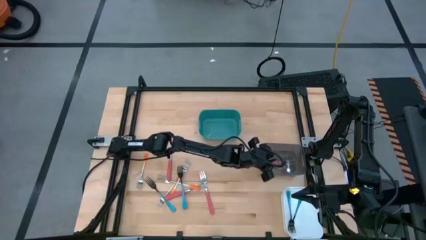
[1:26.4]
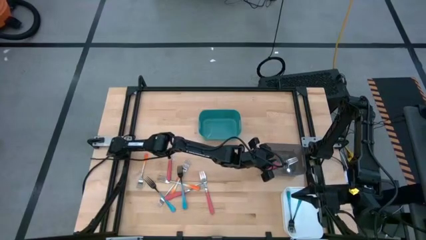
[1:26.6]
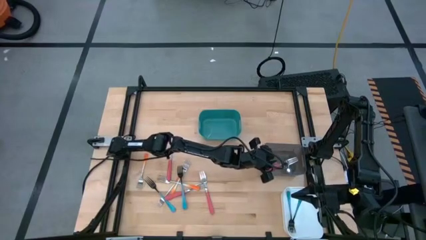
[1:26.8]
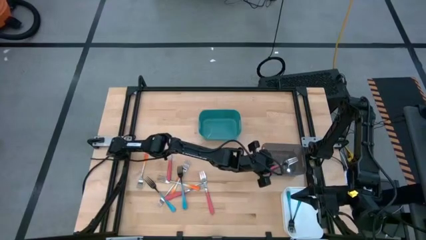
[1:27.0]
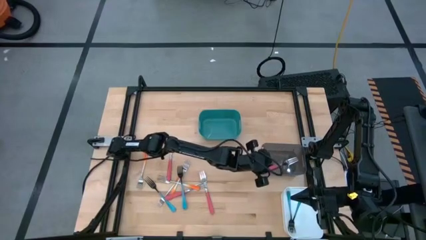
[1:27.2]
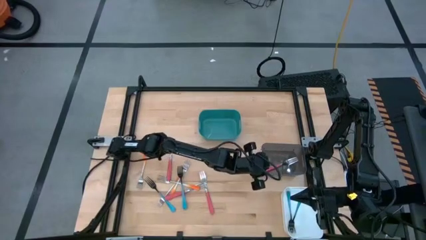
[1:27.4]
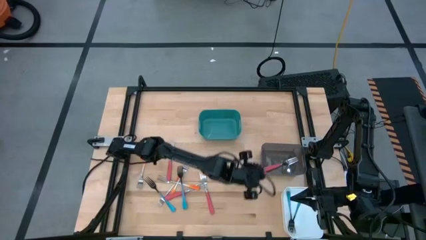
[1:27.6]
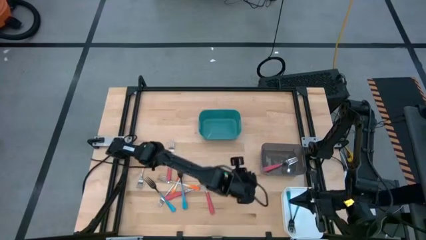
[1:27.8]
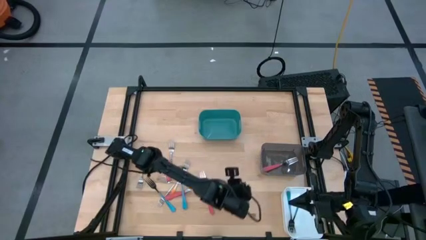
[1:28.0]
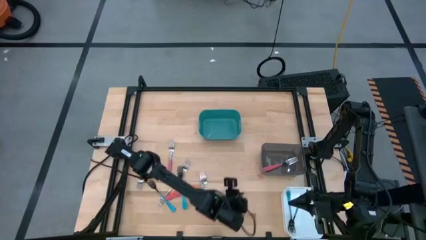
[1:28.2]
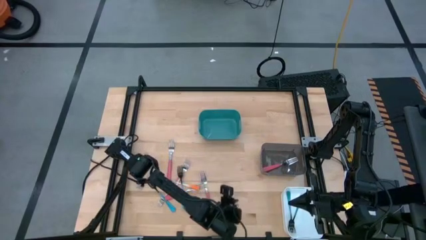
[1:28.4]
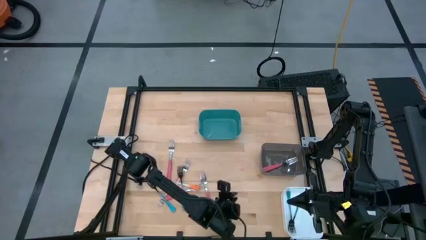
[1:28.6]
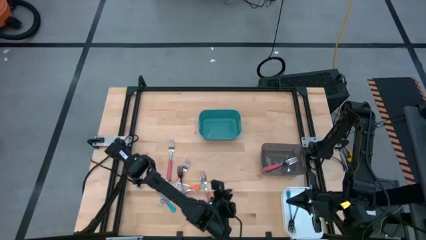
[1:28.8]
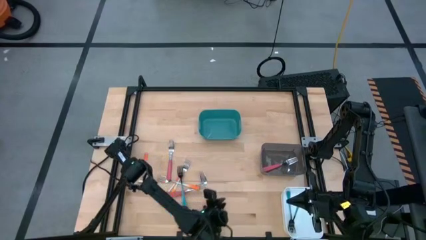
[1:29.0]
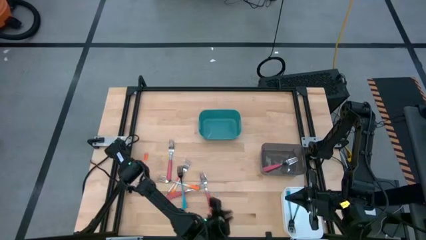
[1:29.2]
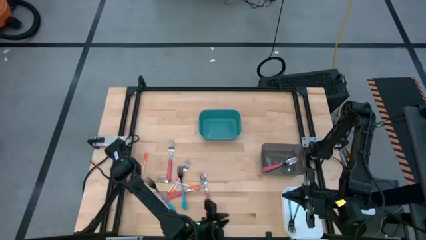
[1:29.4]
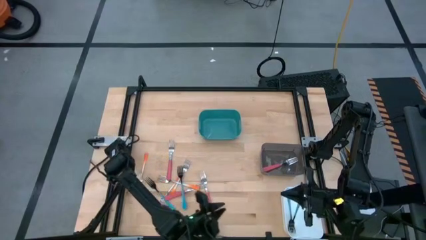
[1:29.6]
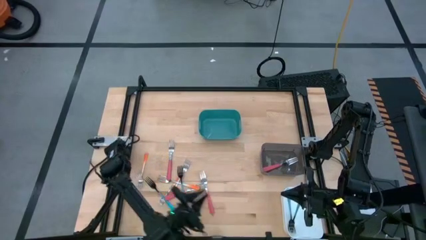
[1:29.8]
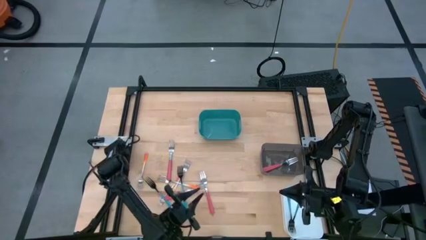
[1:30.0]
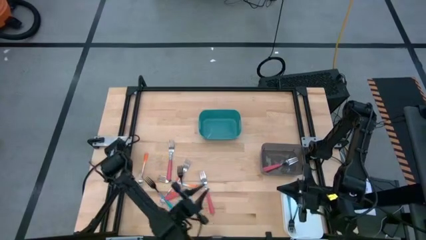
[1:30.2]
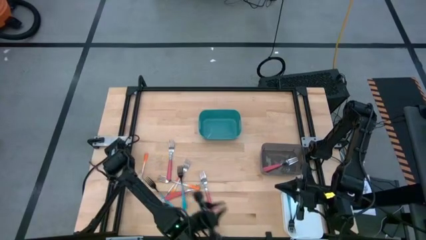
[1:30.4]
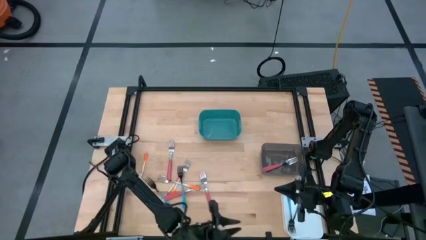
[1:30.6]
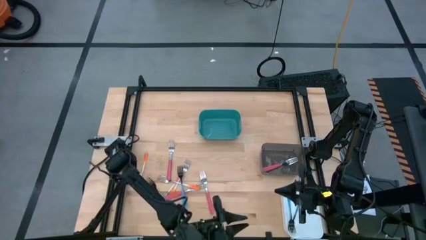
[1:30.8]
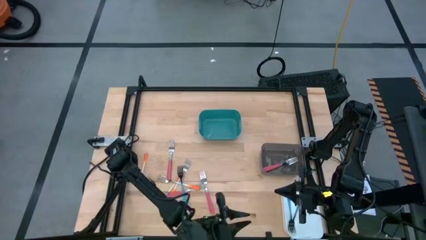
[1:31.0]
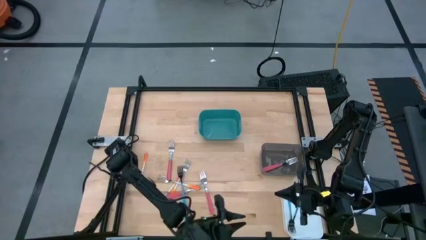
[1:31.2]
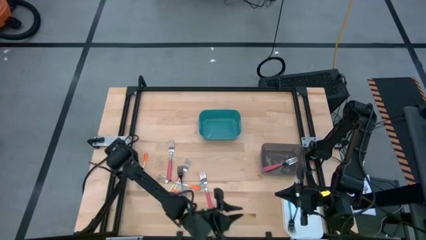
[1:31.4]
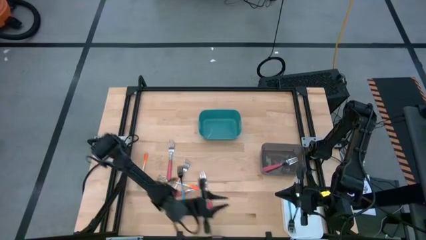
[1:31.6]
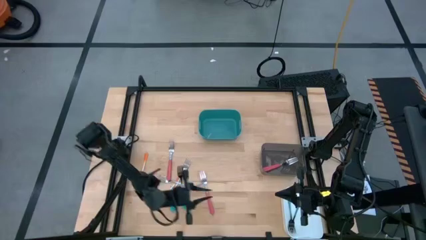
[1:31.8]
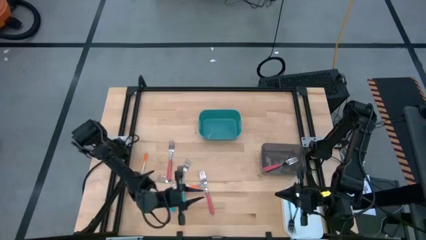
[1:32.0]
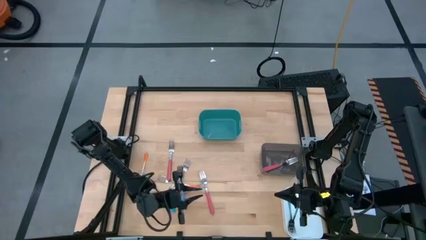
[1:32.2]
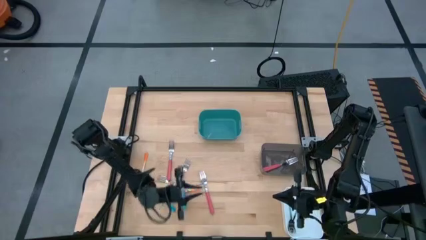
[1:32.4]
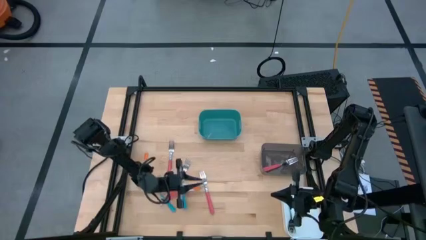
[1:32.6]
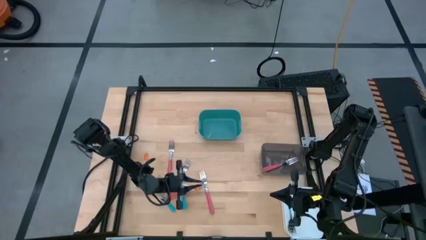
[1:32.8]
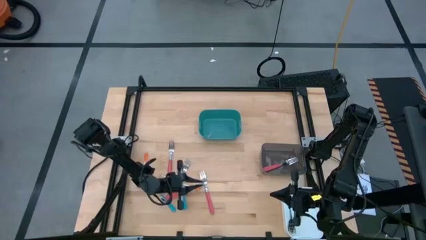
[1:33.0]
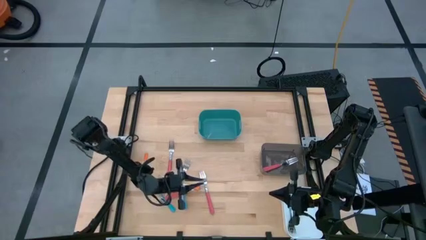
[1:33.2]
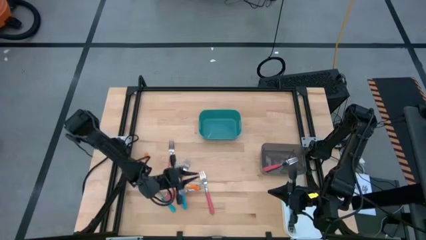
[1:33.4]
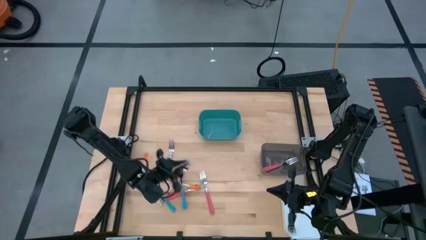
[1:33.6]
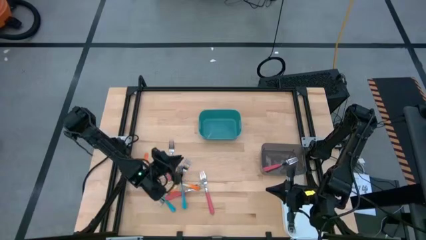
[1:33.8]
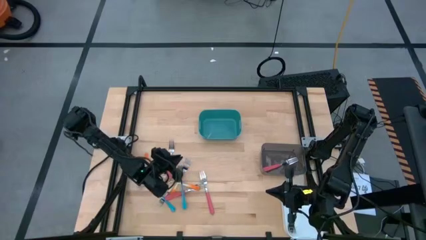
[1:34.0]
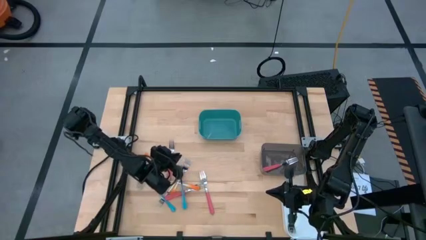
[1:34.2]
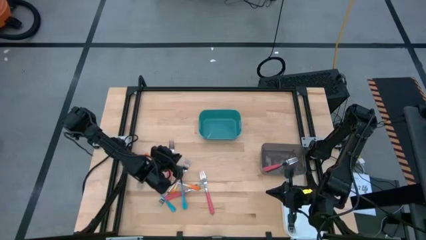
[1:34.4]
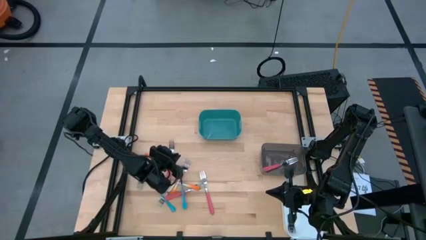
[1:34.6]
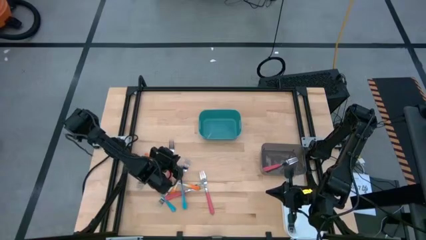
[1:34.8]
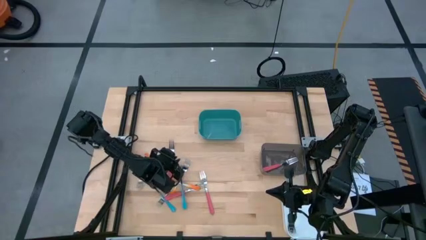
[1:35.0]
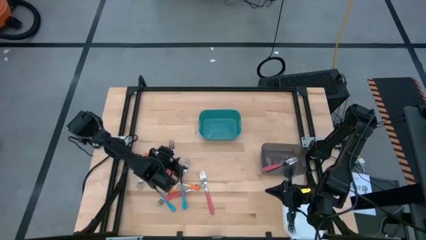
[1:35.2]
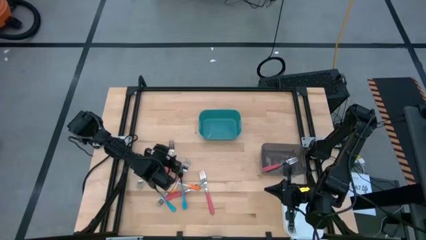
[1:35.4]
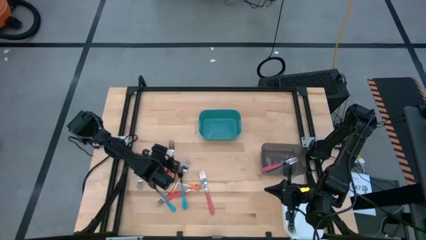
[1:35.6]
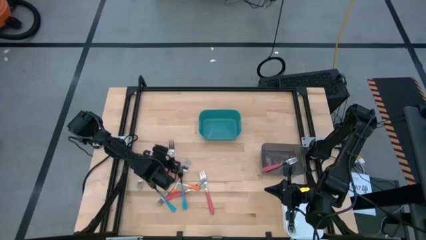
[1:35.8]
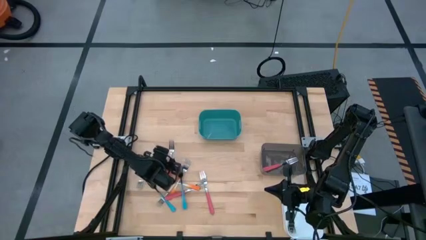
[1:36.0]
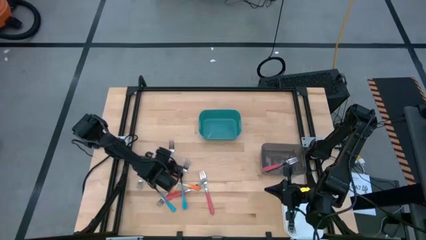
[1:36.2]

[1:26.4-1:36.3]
Task: Sort silverware by color (type)
Put the pink fork into the black bin

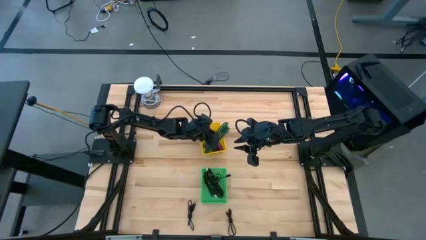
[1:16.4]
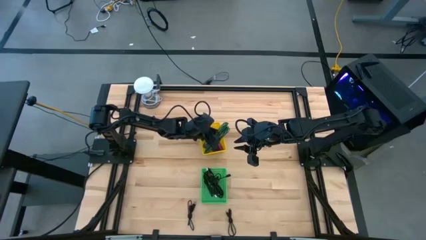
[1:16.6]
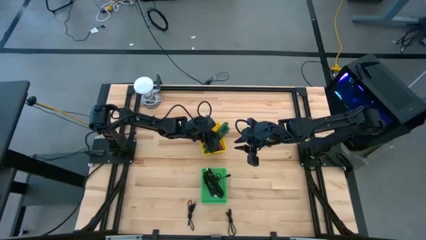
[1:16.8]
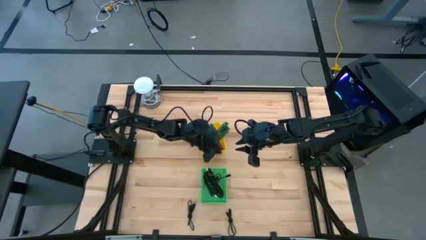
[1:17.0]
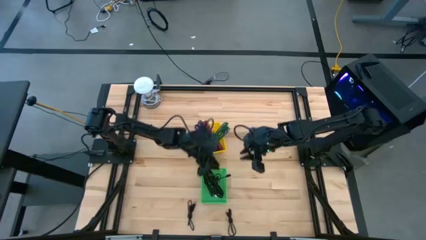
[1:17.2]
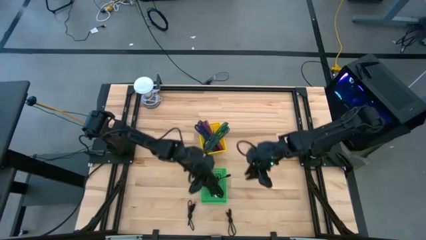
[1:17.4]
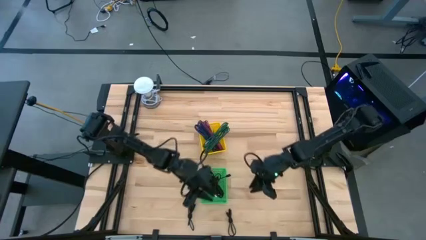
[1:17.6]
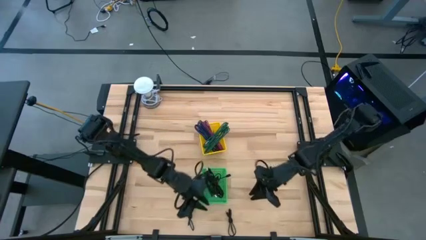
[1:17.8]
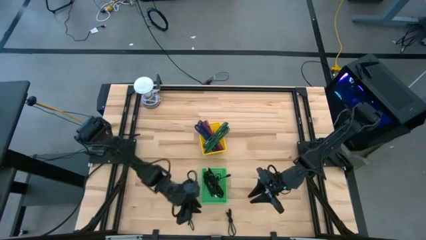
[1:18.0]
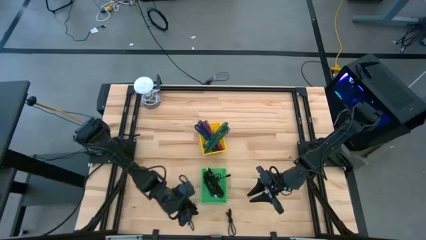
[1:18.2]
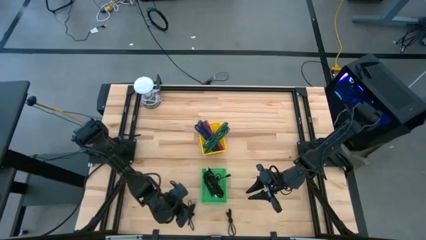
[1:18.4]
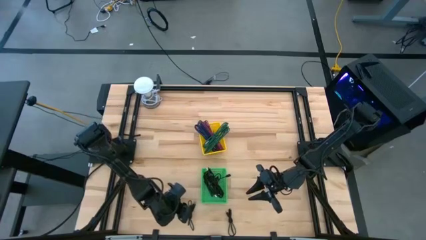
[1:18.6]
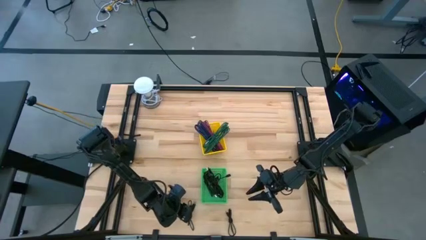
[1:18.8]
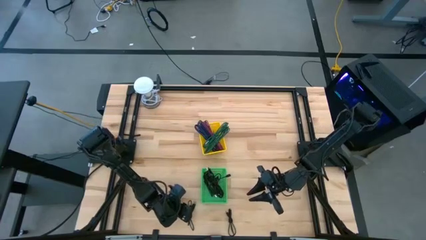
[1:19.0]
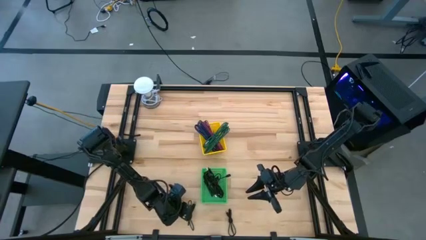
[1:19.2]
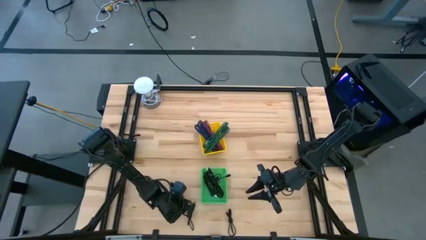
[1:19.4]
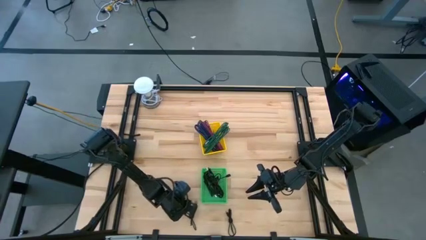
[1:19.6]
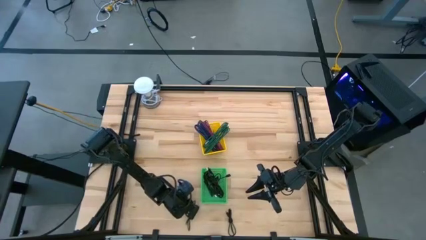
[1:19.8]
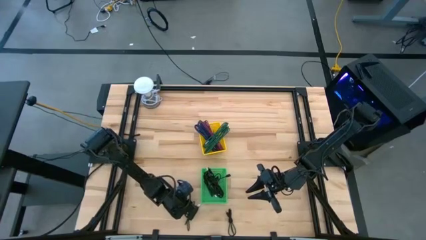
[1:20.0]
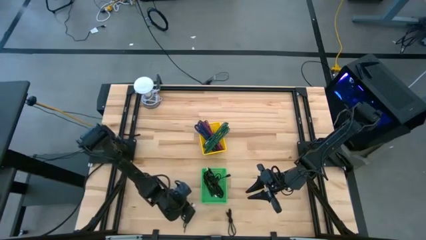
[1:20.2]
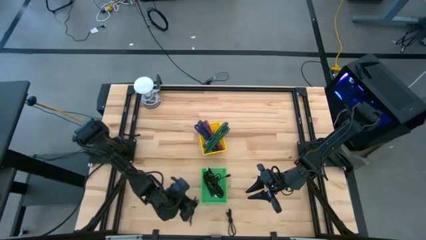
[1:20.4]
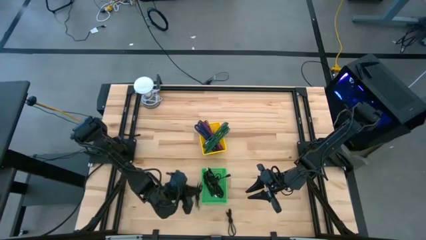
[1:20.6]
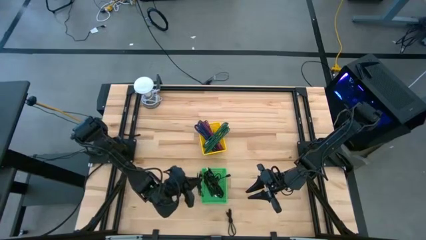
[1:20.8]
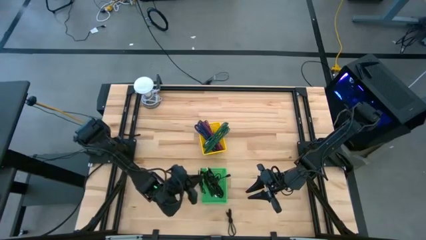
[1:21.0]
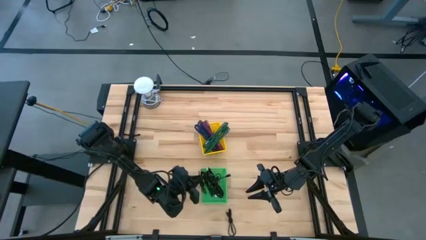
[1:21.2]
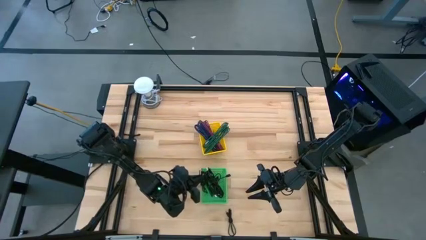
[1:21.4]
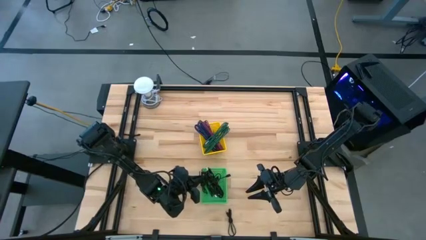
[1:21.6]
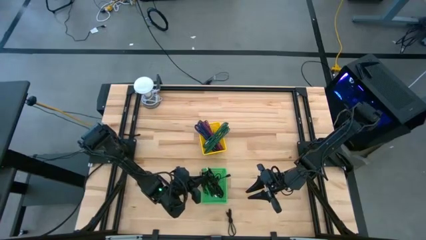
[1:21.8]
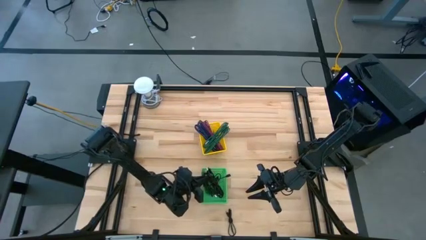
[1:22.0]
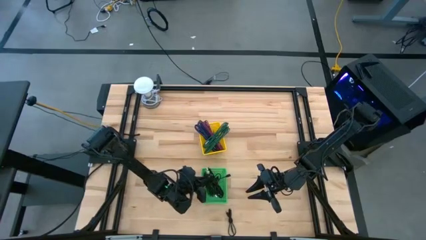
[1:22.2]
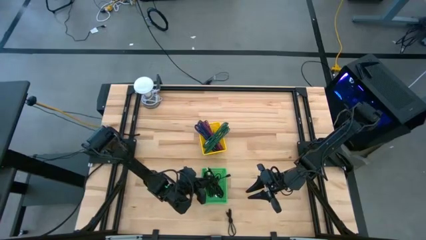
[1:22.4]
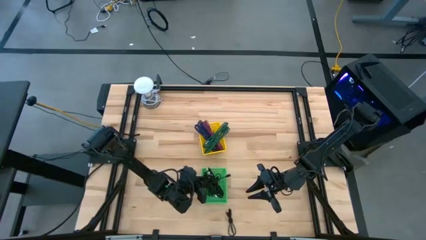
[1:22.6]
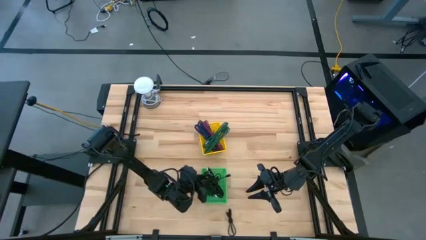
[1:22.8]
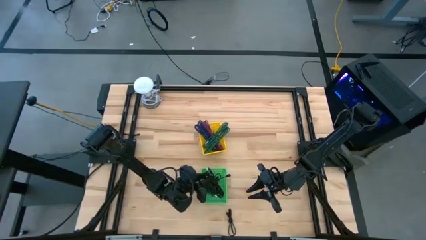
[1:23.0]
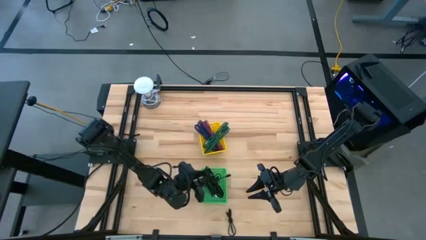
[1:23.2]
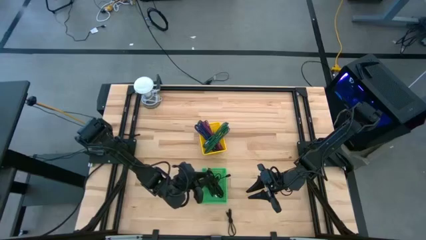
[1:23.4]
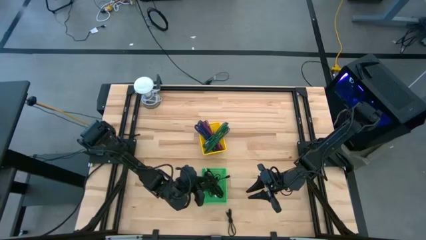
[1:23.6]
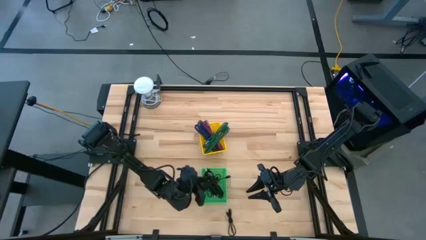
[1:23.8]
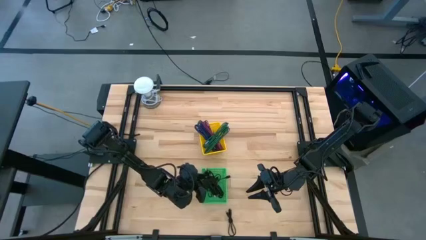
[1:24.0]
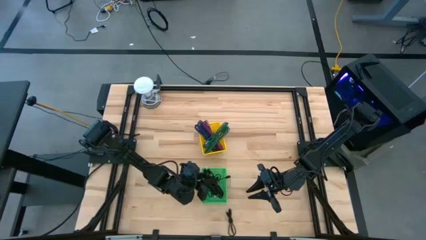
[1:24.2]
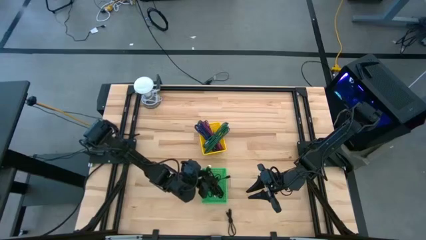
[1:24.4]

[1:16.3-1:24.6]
Task: Pick & Place USB Port
Put the black charger cable into the green bin
